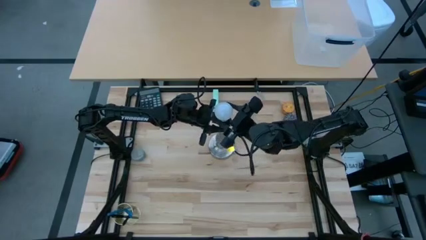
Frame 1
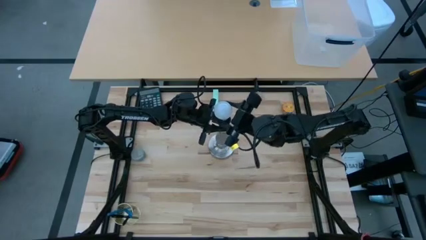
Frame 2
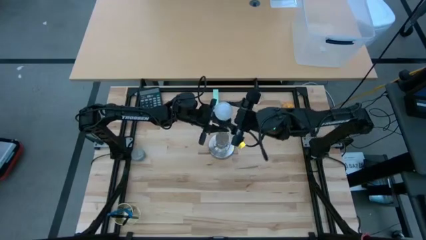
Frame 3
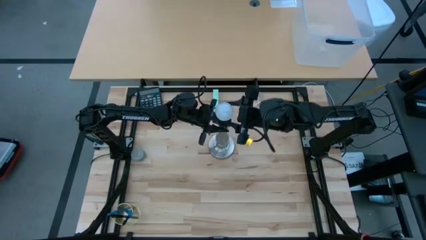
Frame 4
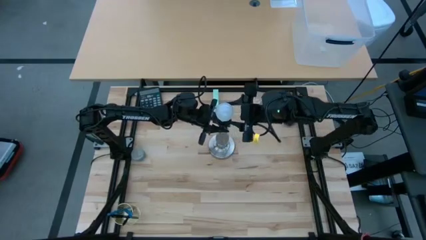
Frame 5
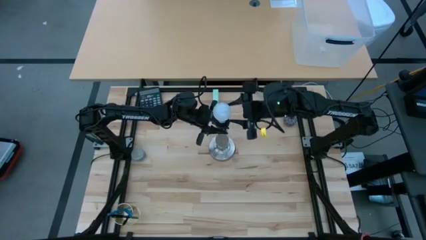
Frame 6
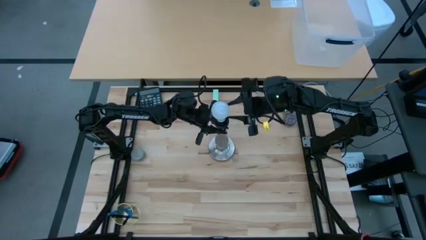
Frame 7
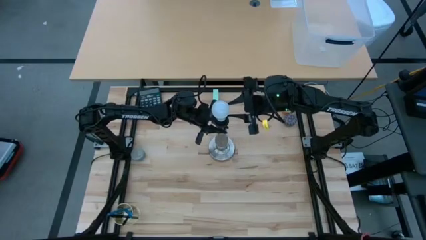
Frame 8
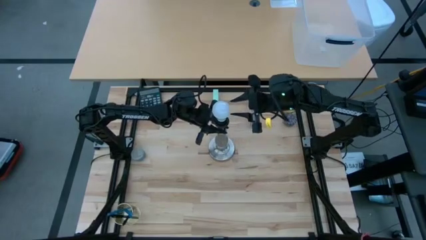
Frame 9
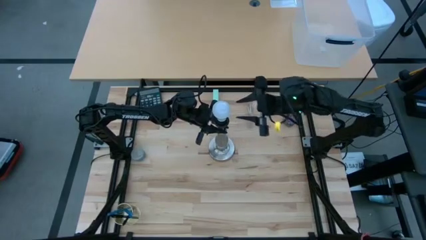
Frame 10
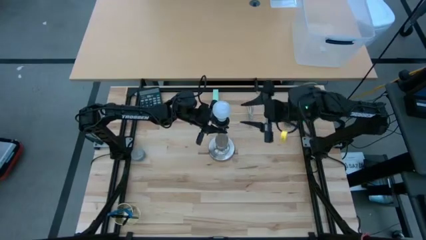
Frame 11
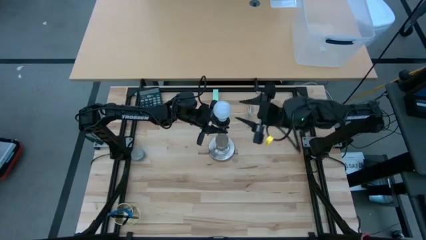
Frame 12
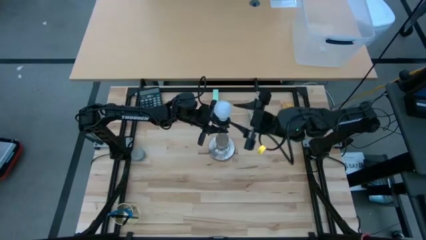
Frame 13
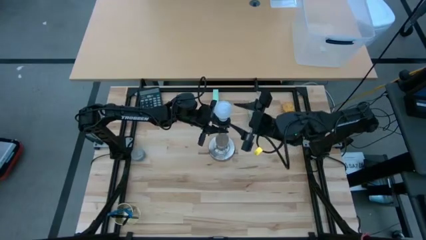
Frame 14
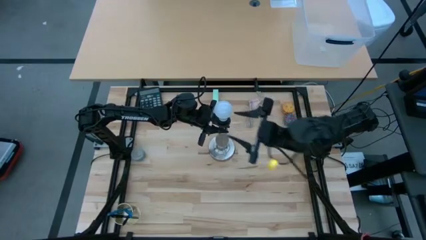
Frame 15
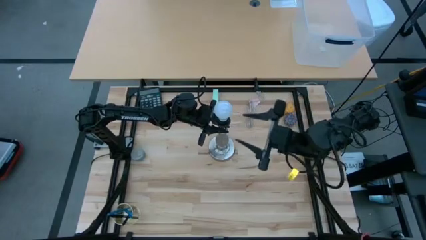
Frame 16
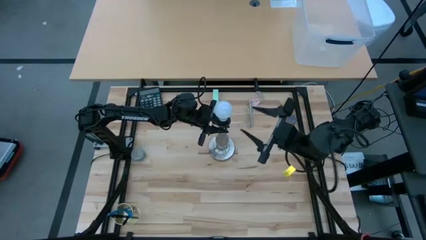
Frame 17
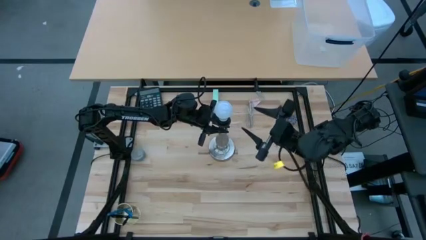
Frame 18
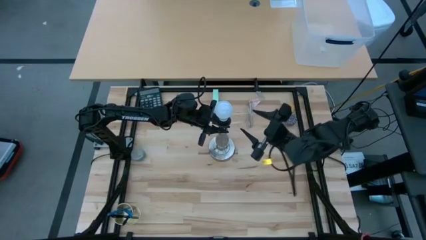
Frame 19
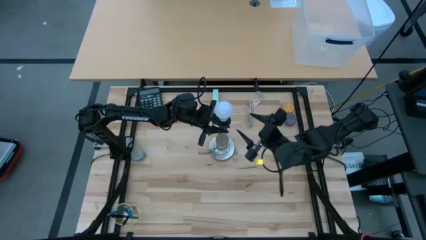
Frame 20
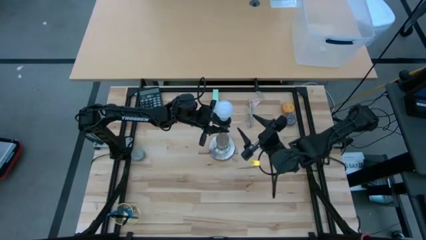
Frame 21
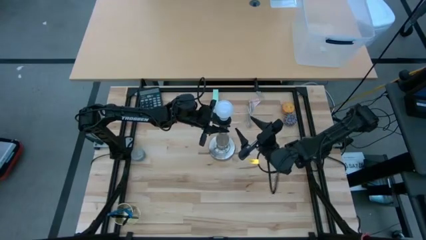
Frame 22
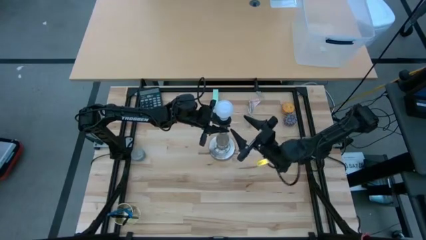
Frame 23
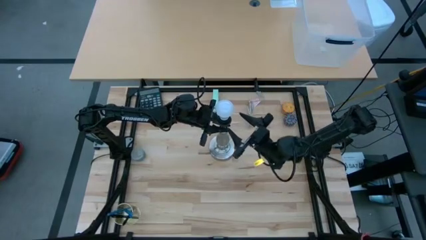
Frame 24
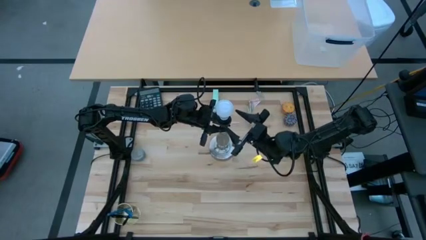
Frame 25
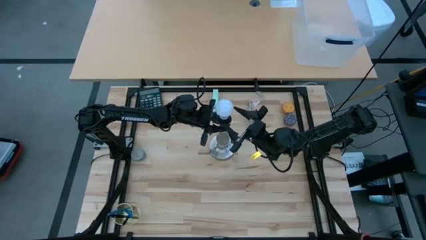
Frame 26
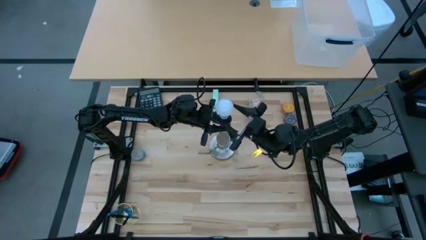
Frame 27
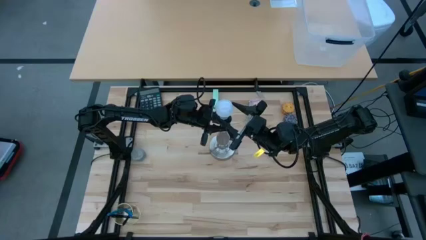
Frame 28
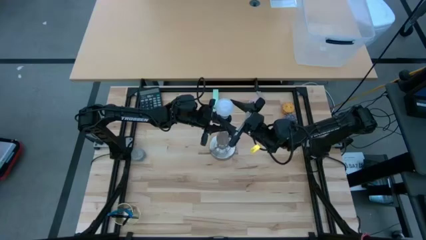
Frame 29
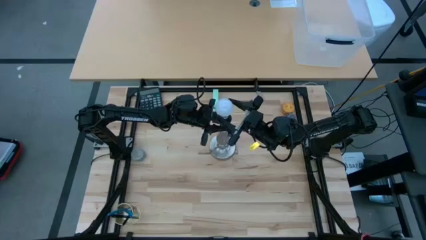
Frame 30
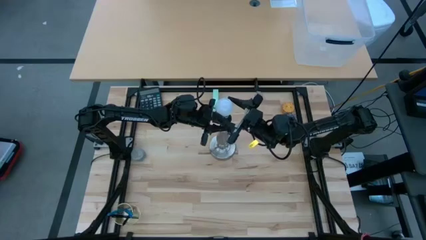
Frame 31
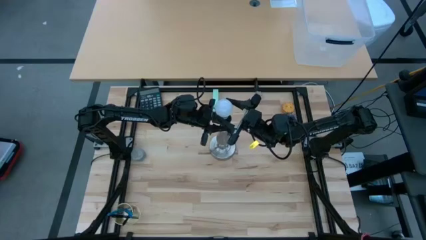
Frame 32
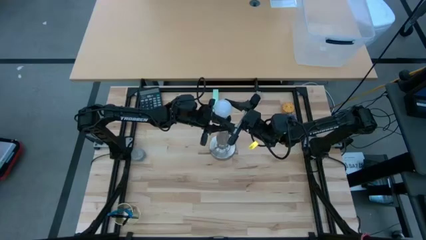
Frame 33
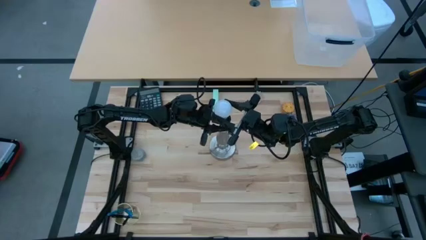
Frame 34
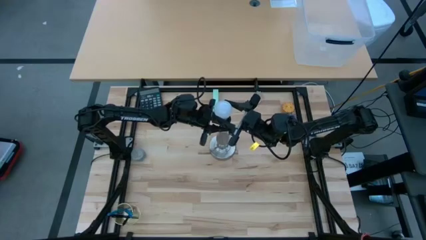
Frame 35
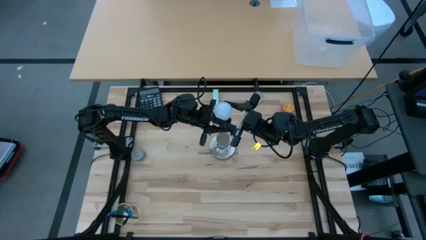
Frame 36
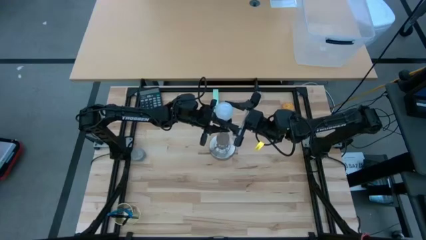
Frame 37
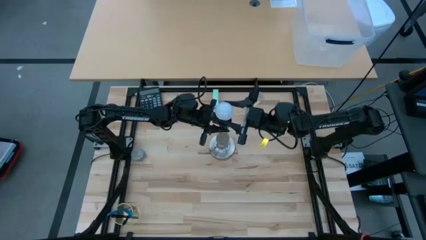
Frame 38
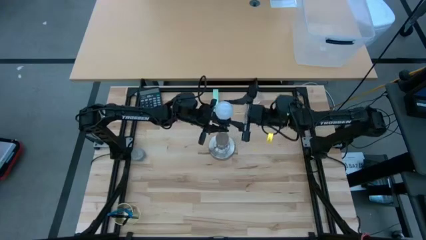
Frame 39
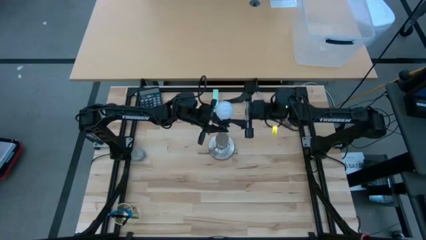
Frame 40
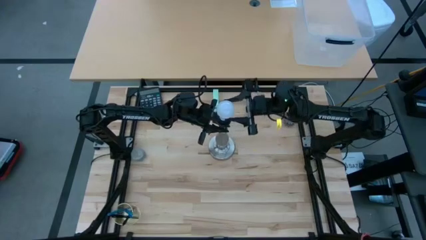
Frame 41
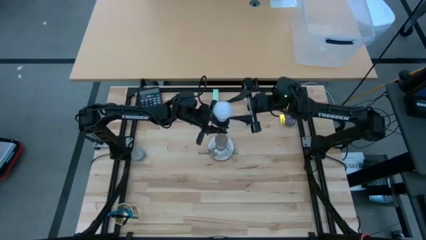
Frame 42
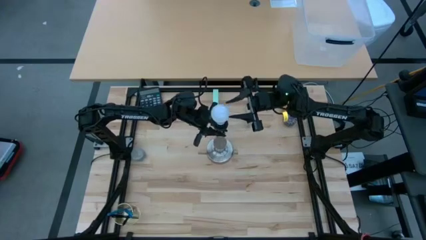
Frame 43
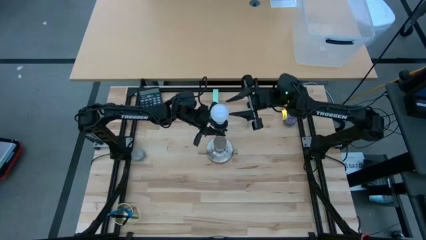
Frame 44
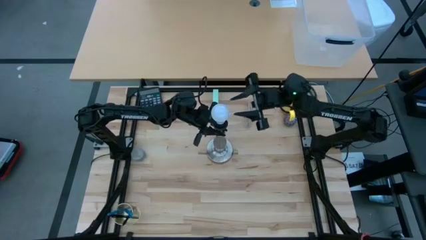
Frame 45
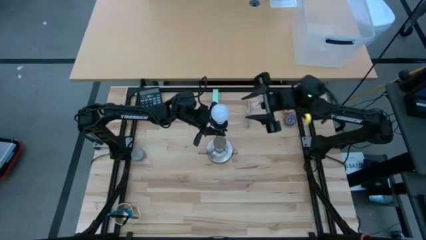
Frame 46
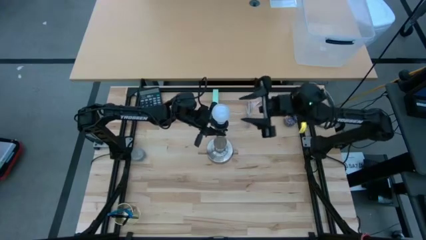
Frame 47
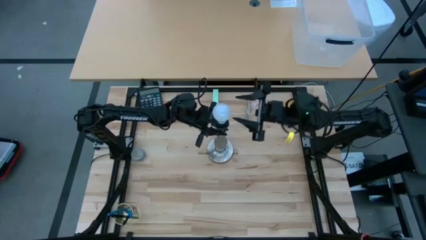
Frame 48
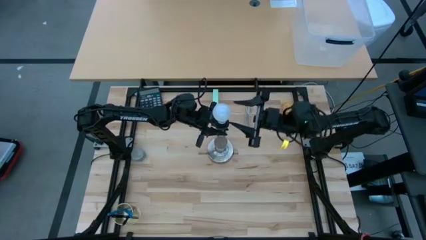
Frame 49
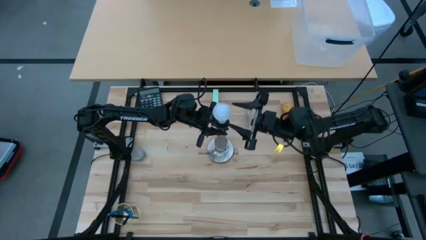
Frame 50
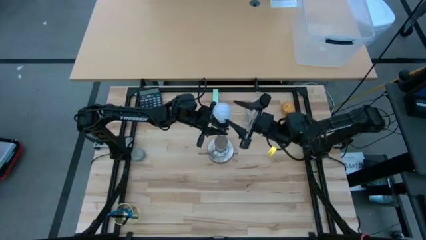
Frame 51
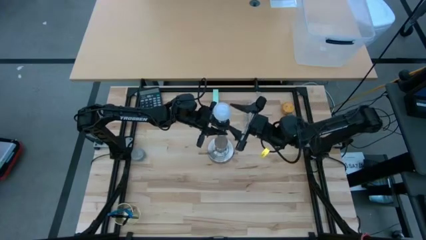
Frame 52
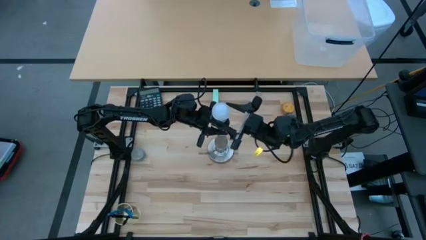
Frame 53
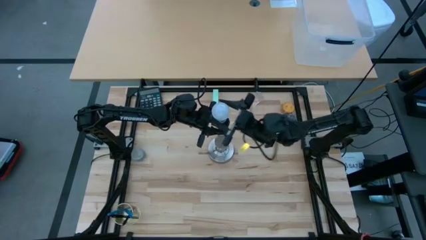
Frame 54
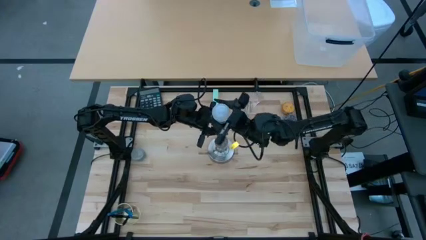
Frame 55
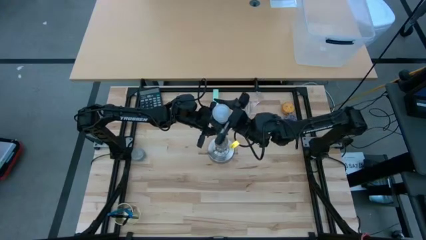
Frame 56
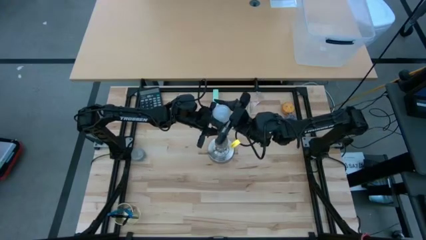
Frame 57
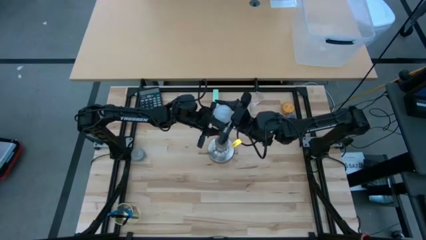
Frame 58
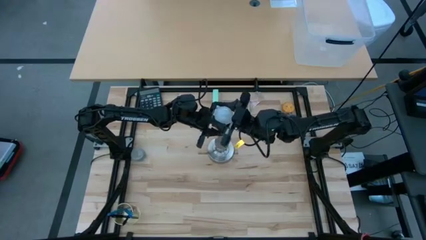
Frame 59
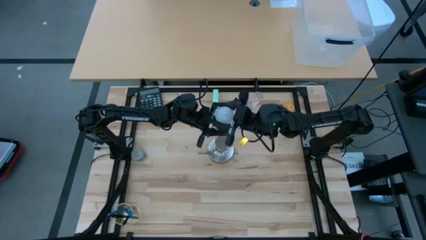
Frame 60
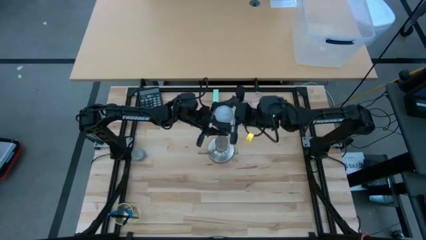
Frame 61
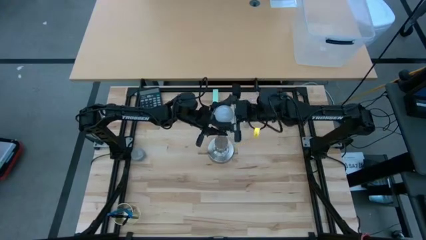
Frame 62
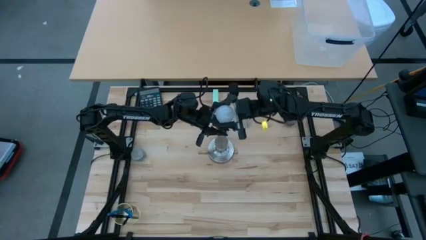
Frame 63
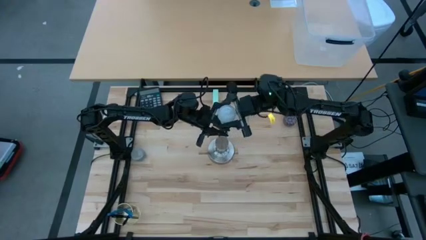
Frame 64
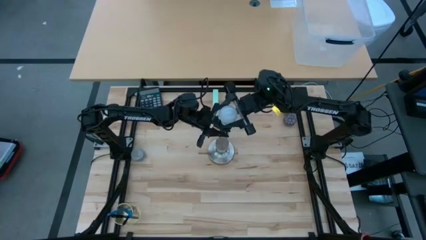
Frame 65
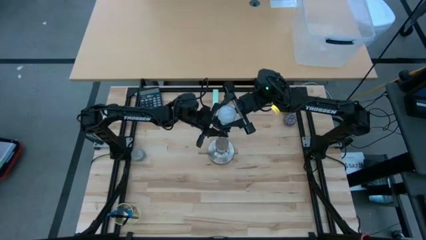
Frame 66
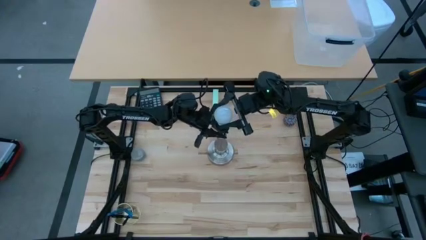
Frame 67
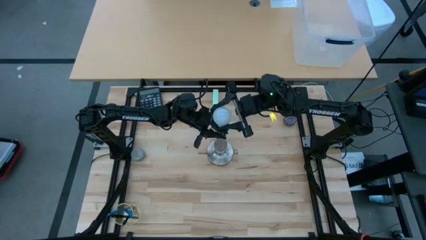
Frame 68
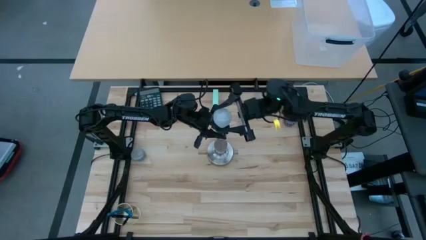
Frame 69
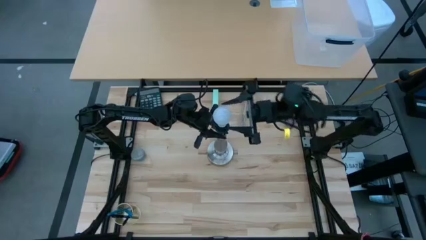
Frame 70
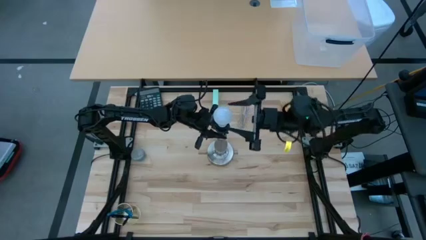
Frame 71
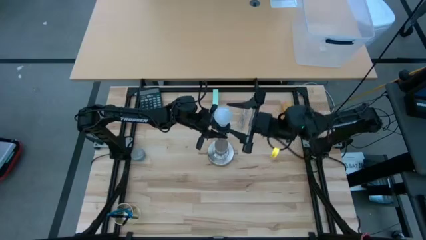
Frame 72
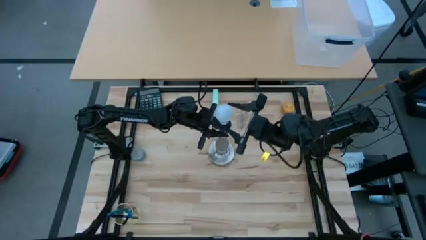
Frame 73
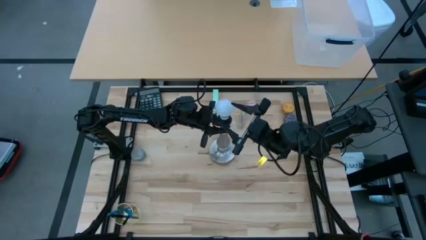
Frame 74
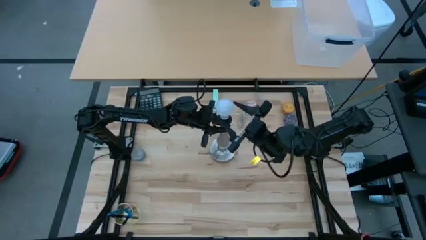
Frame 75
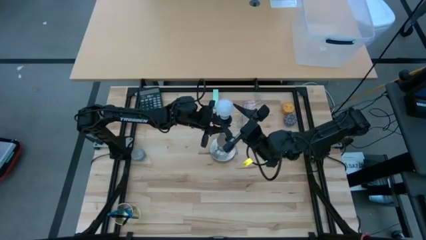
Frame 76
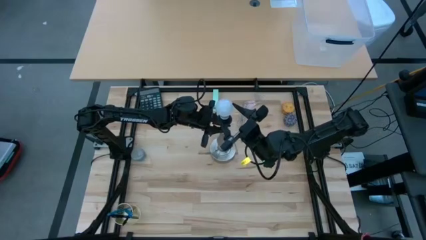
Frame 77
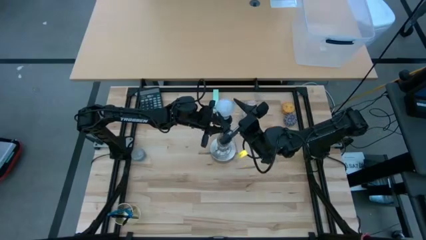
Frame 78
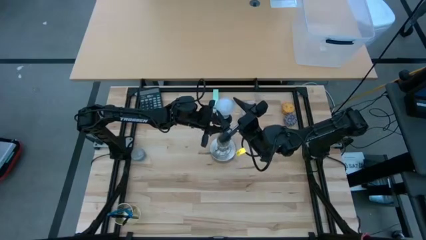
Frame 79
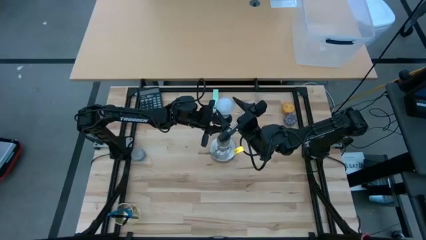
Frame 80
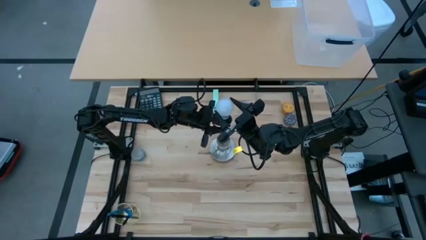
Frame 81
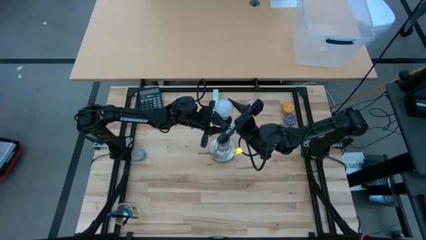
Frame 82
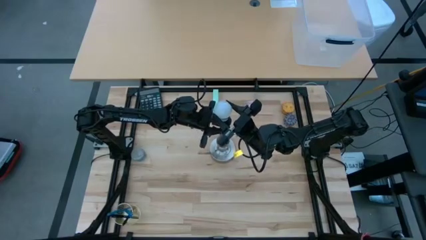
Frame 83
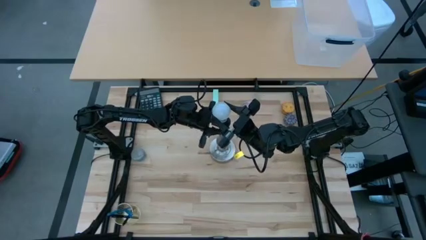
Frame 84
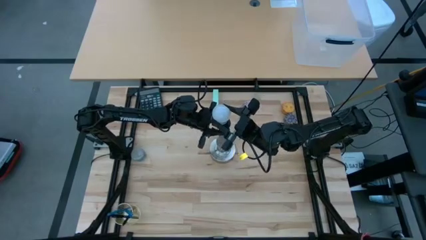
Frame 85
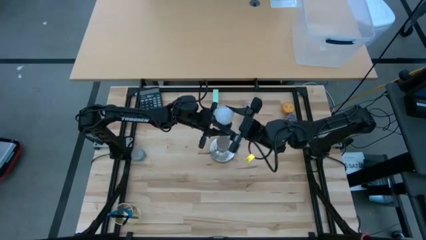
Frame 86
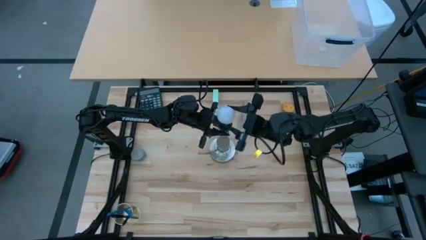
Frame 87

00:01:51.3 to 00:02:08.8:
Task: Screw lightbulb
Remove the white lightbulb from the desk lamp
